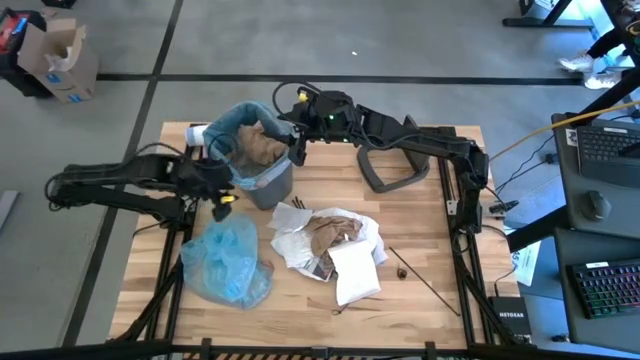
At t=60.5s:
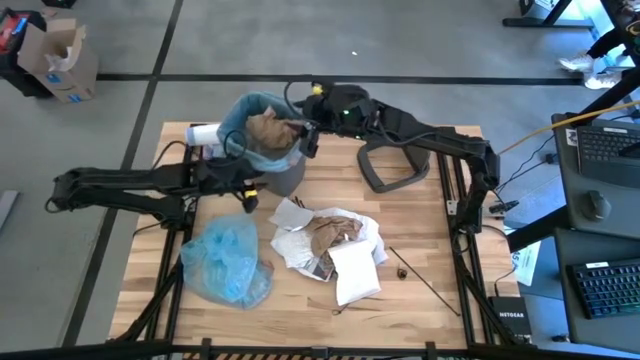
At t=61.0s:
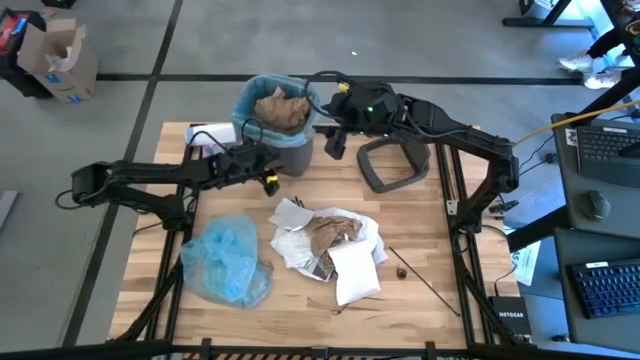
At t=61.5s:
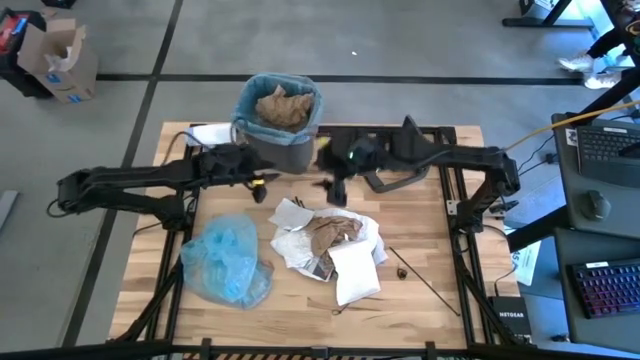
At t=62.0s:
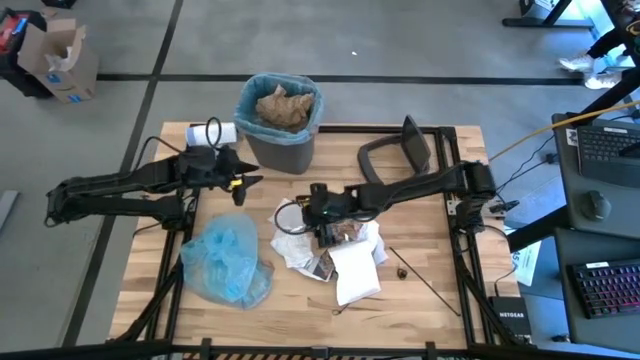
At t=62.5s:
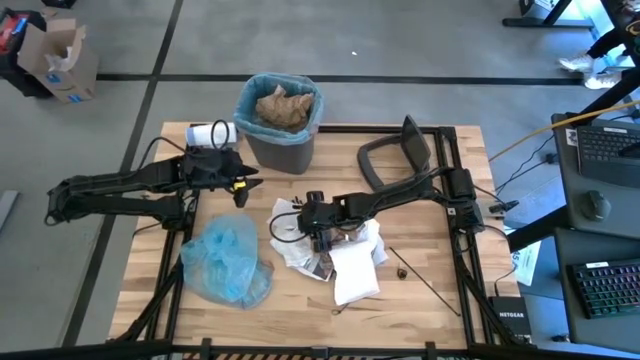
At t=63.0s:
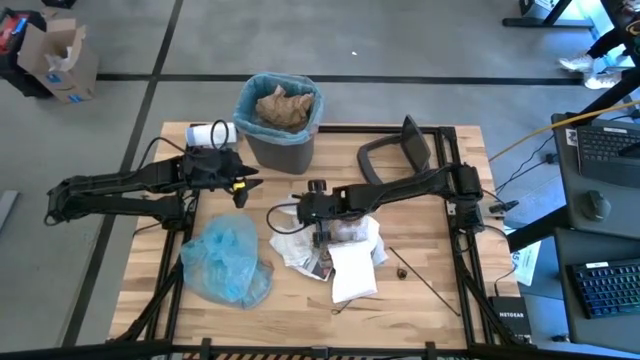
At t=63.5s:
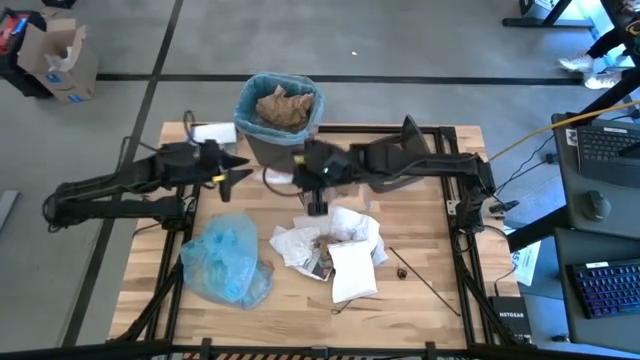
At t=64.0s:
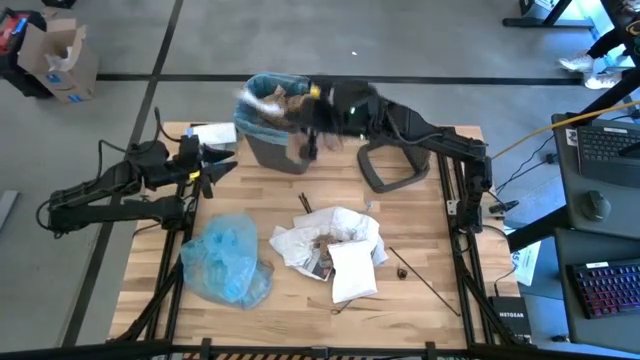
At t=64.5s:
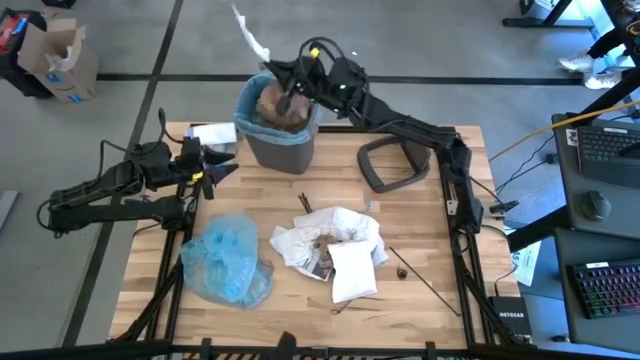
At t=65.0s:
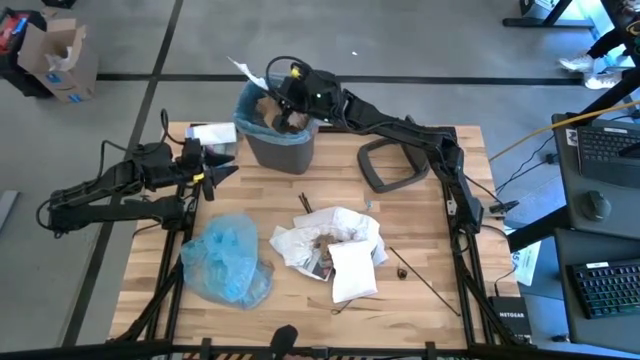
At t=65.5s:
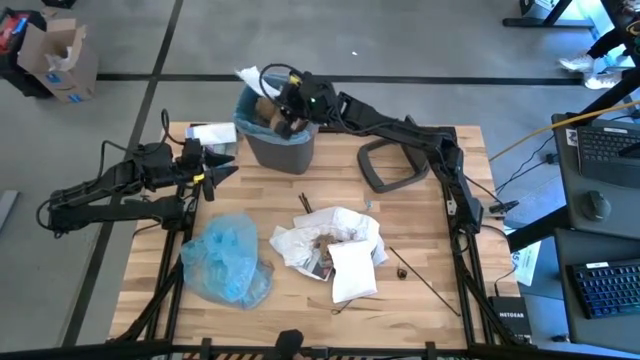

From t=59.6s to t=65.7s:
Task: Pick and place trash into bin
Put the white paper and brown napkin into the trash bin

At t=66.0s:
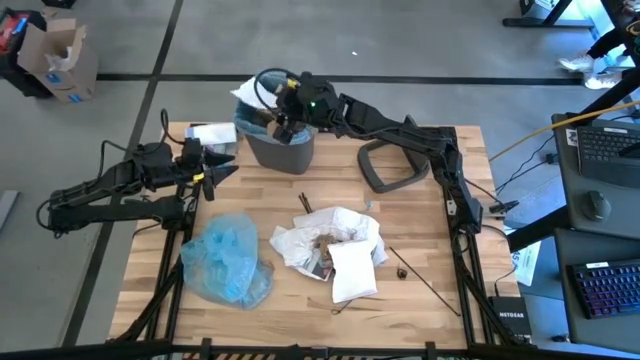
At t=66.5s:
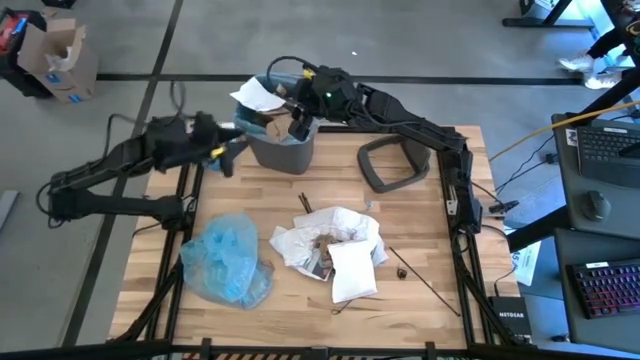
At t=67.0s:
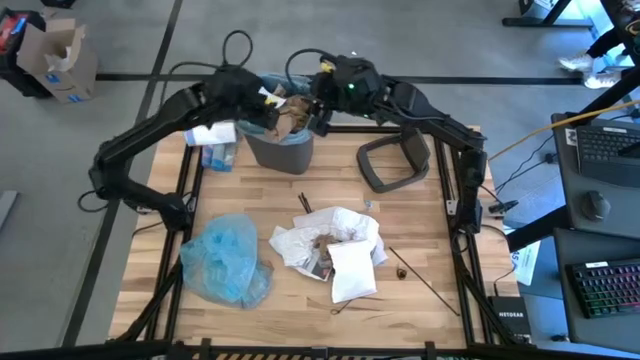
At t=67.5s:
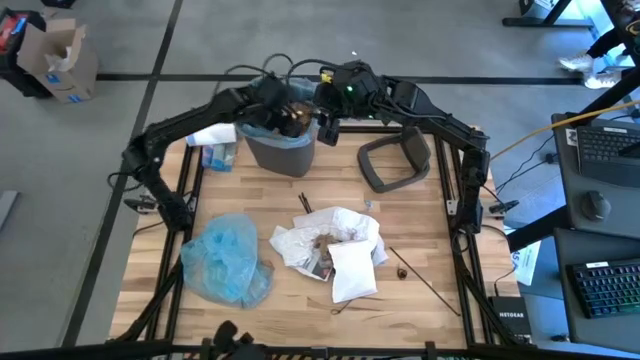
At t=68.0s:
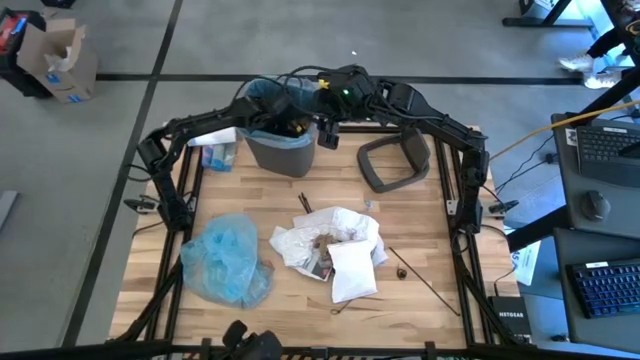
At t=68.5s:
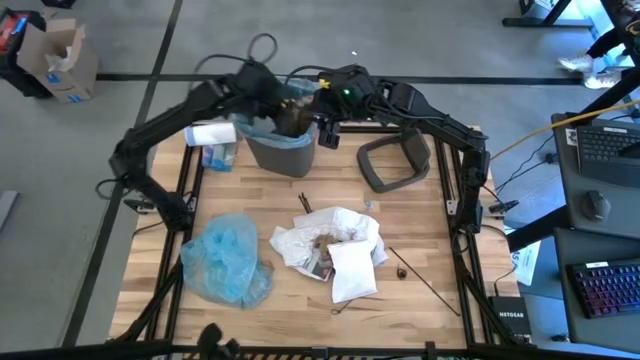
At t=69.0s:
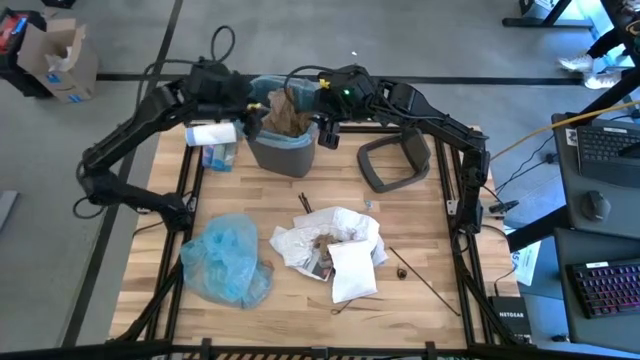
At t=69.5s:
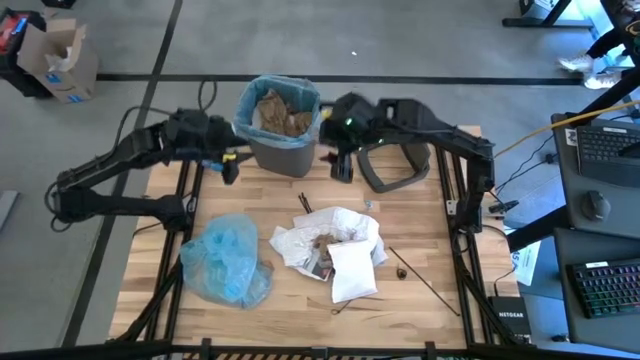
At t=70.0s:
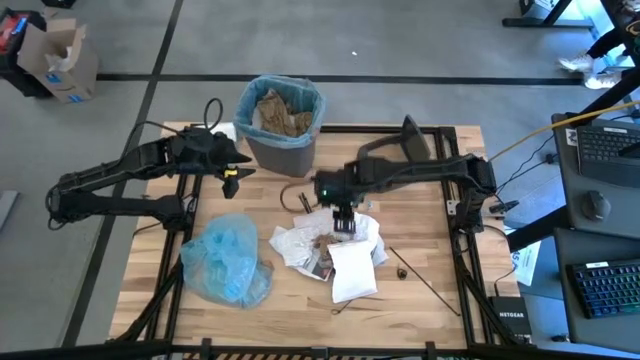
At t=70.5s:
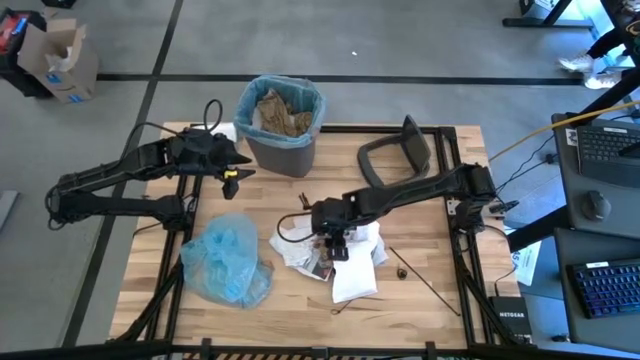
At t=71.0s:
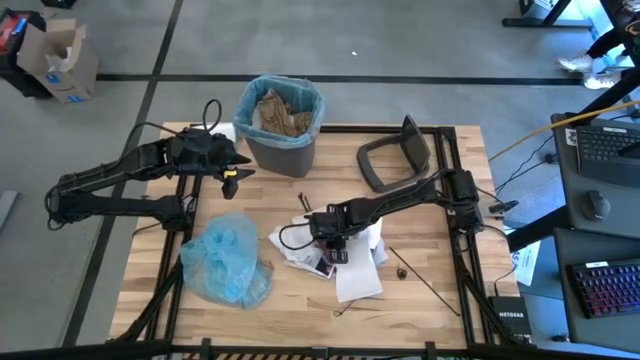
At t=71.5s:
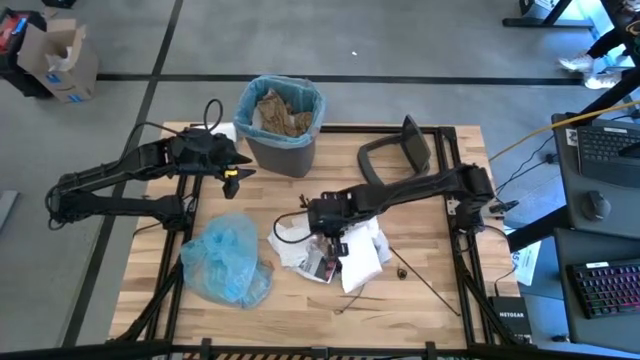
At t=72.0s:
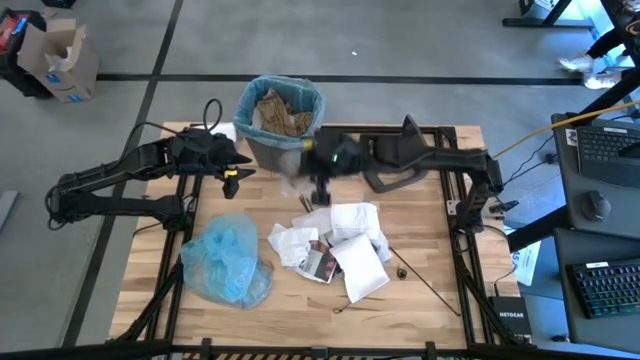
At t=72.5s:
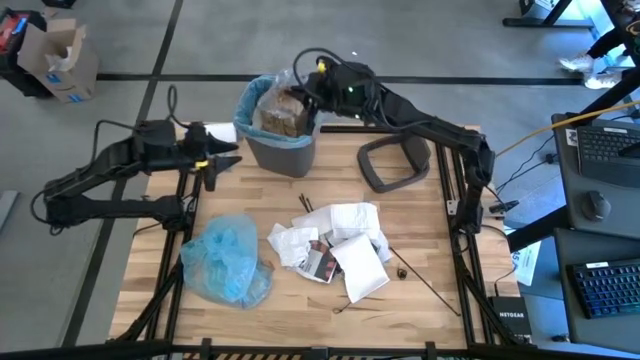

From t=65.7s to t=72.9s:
Put the transparent cellophane and brown napkin into the trash bin

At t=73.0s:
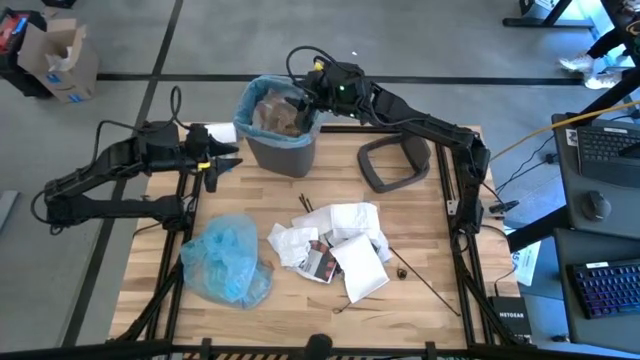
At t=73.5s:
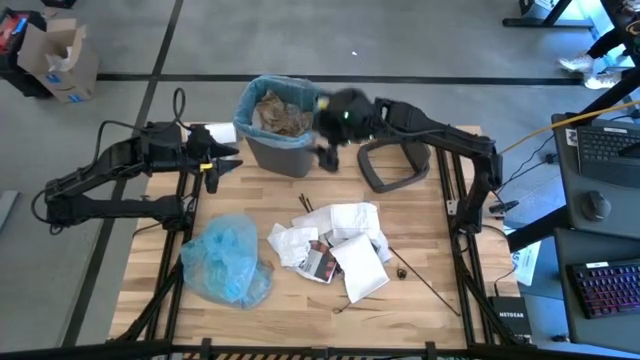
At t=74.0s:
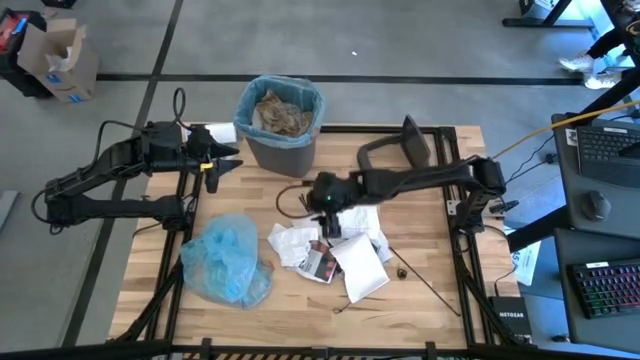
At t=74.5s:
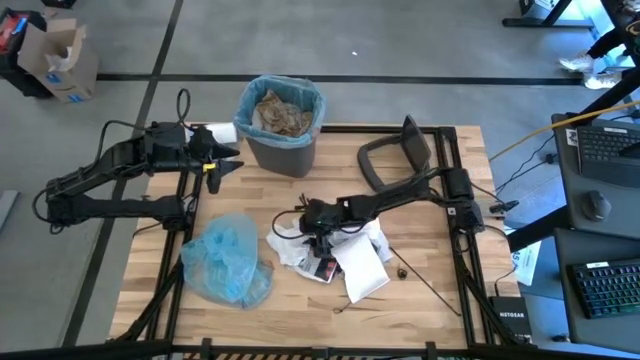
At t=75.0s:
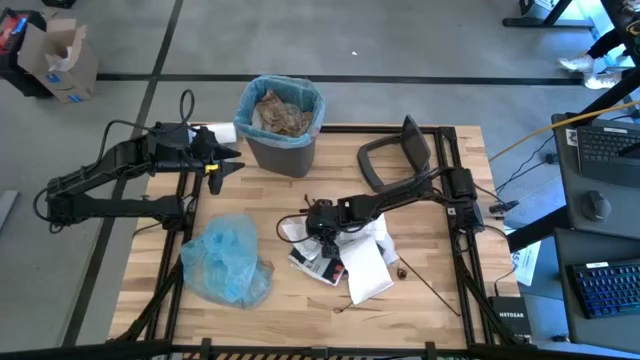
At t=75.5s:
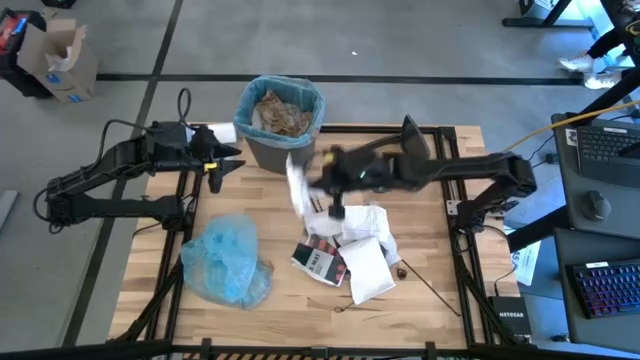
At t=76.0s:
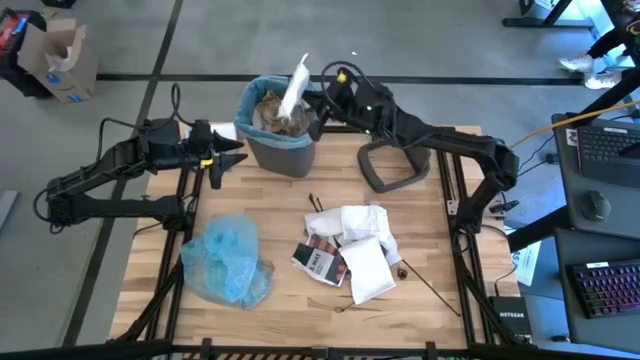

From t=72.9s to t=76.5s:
Put the bubble wrap into the trash bin

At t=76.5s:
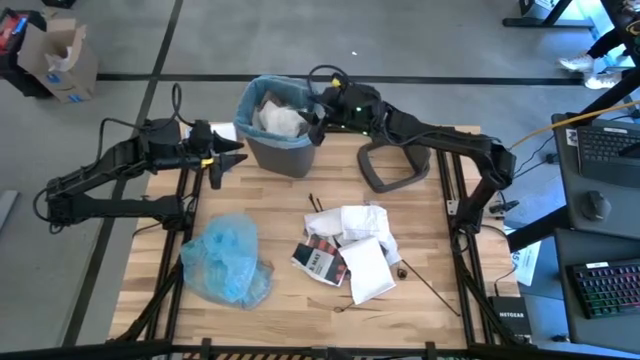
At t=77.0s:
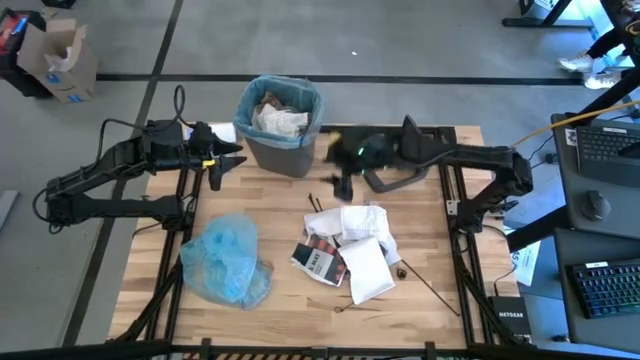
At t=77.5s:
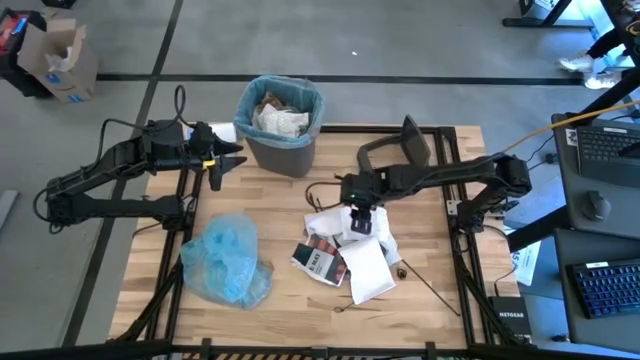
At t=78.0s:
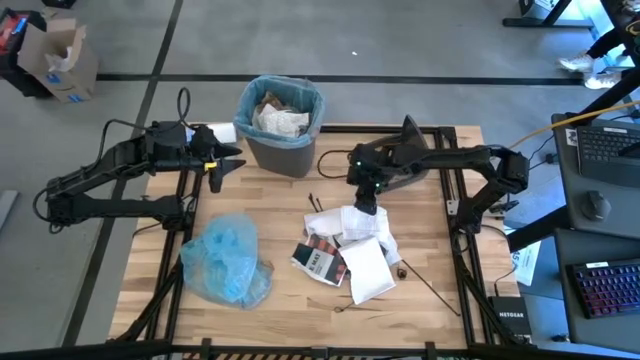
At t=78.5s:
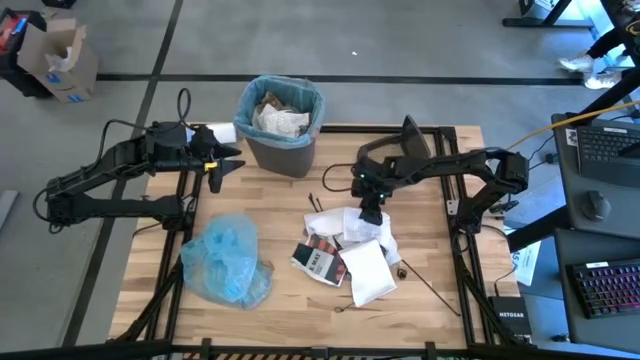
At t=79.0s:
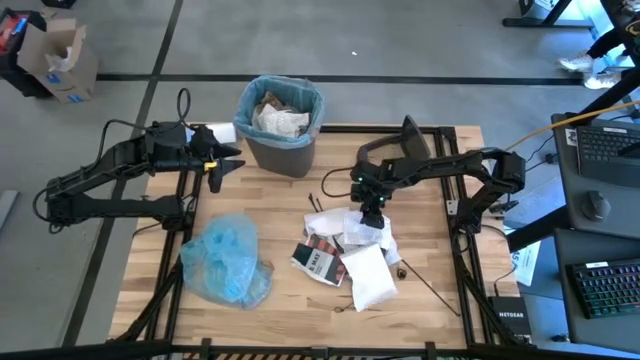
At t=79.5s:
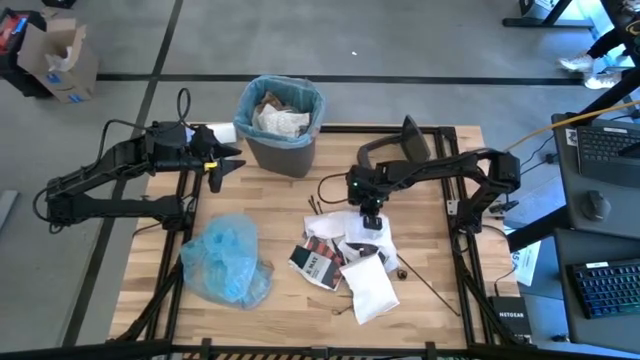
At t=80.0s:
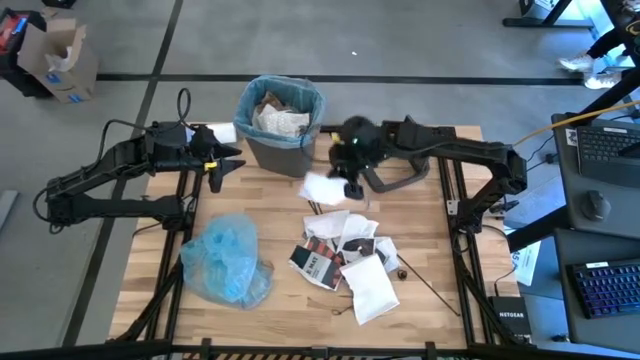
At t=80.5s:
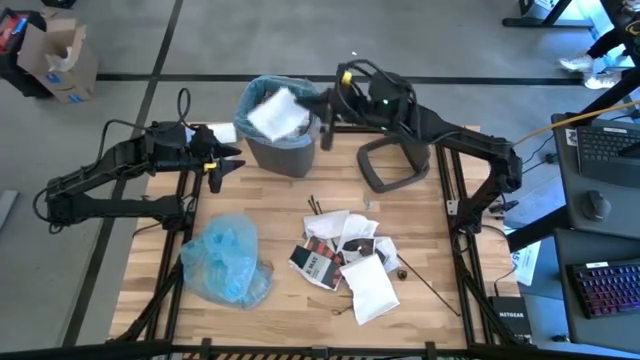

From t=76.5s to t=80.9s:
Put the piece of white notebook paper into the trash bin
